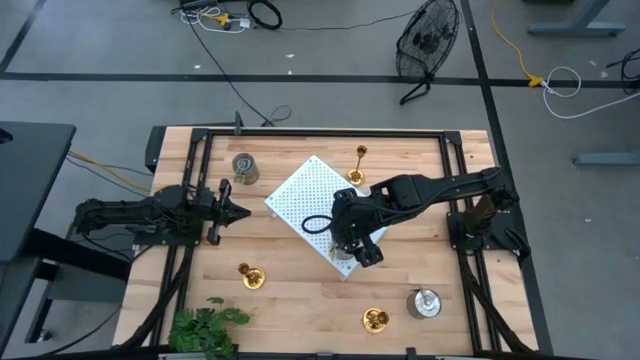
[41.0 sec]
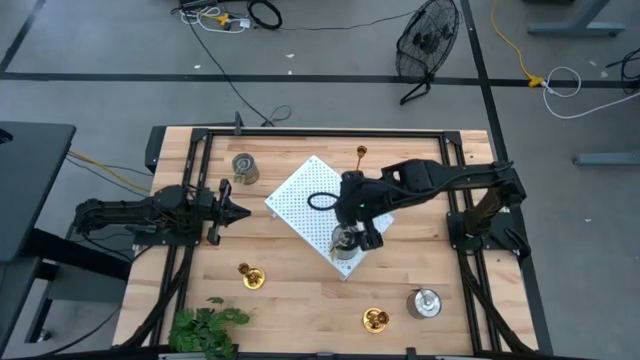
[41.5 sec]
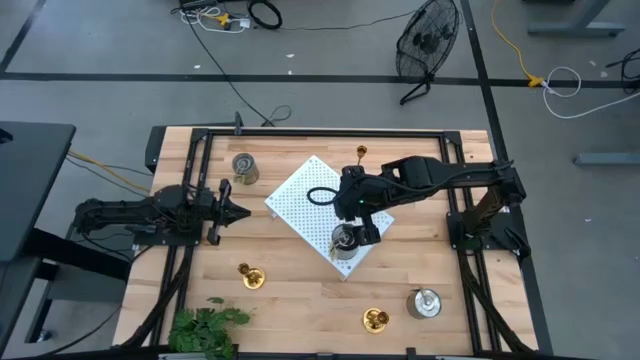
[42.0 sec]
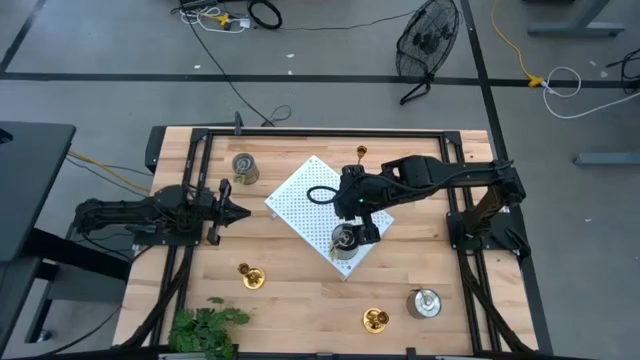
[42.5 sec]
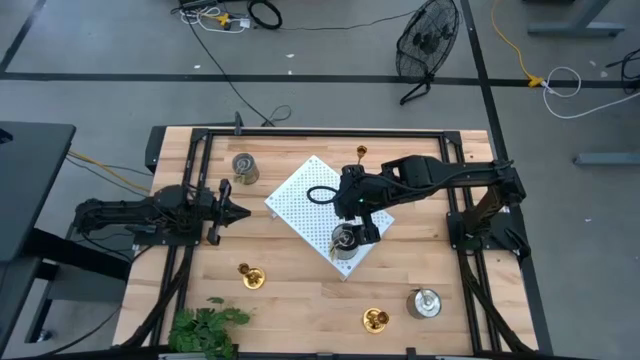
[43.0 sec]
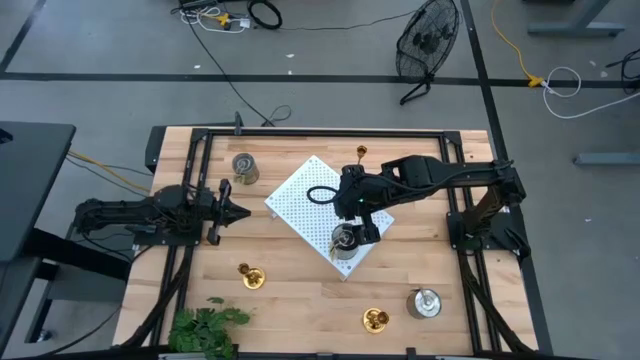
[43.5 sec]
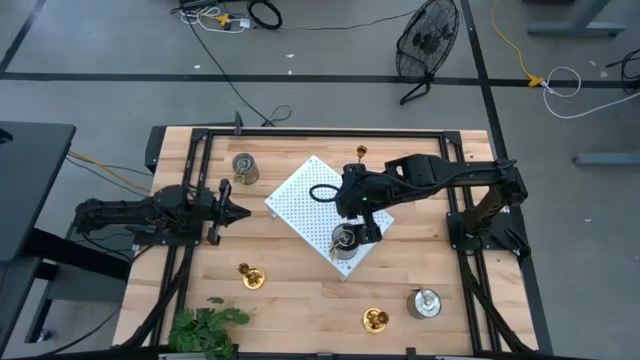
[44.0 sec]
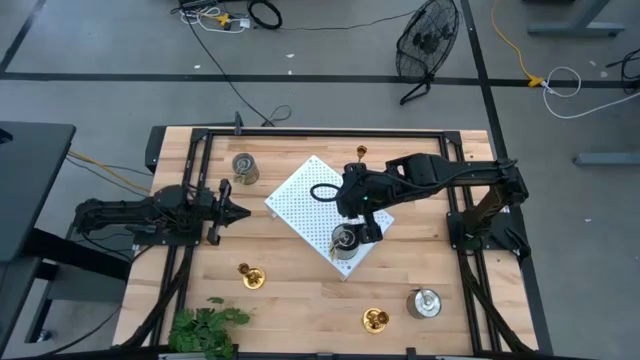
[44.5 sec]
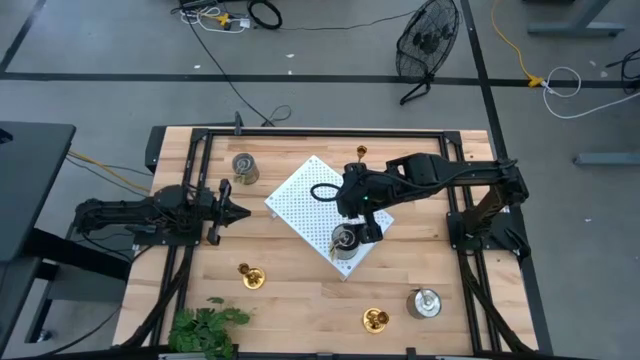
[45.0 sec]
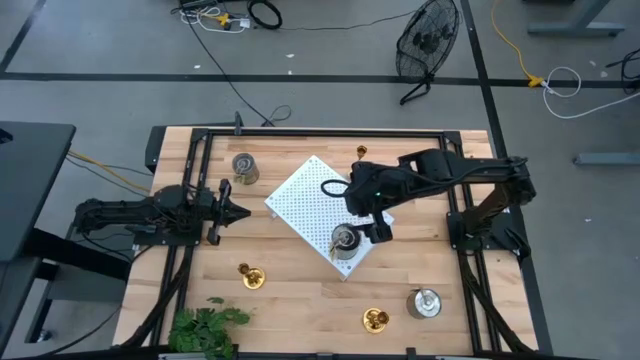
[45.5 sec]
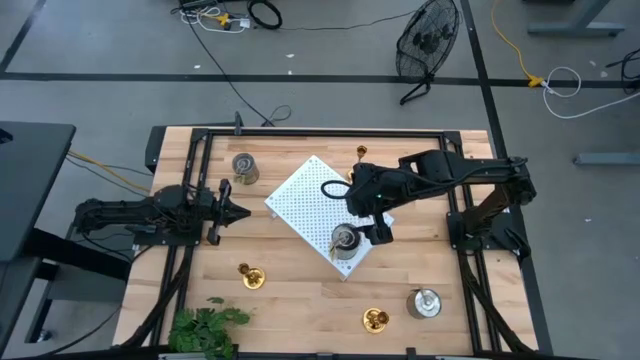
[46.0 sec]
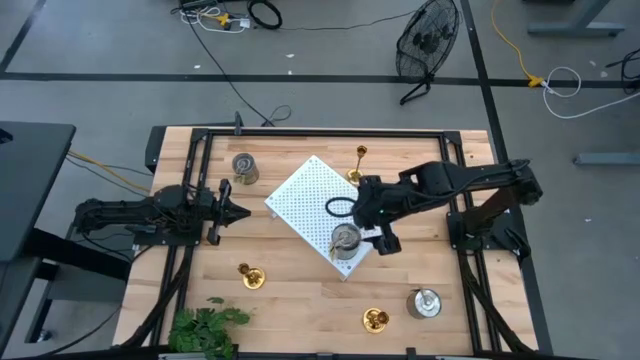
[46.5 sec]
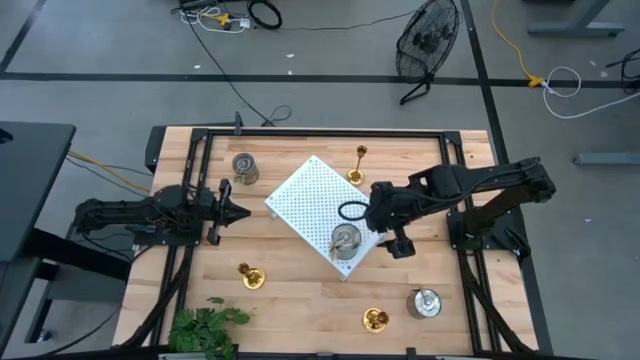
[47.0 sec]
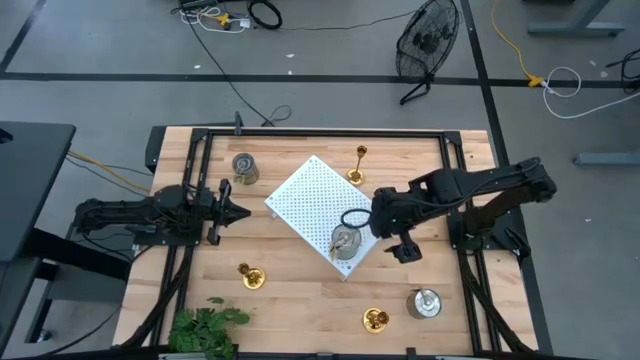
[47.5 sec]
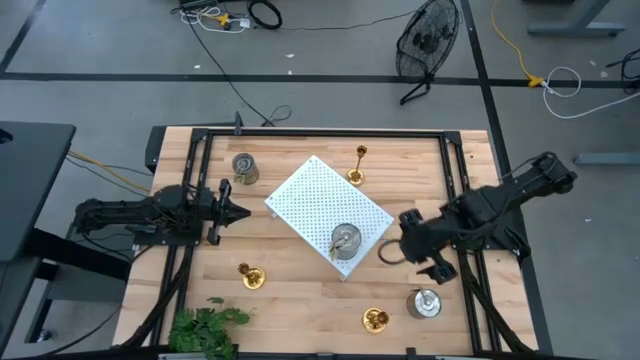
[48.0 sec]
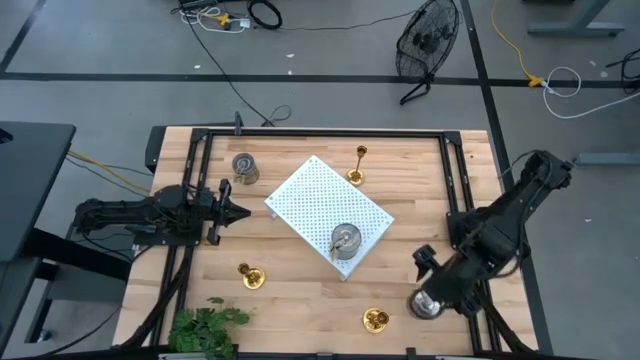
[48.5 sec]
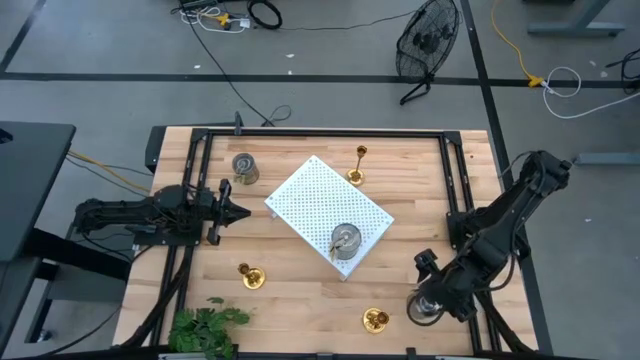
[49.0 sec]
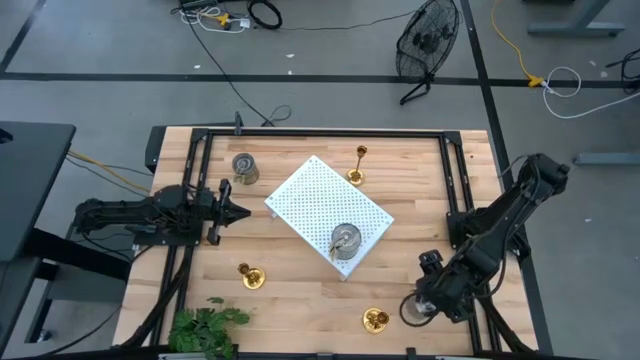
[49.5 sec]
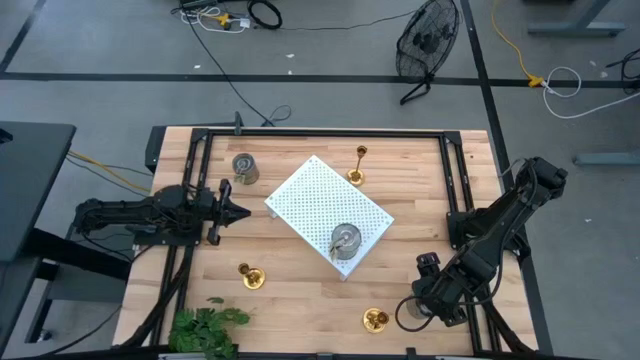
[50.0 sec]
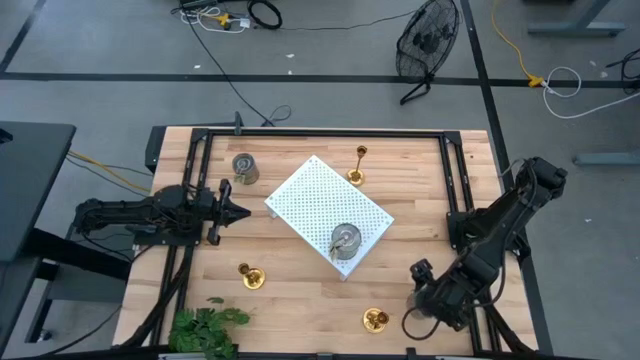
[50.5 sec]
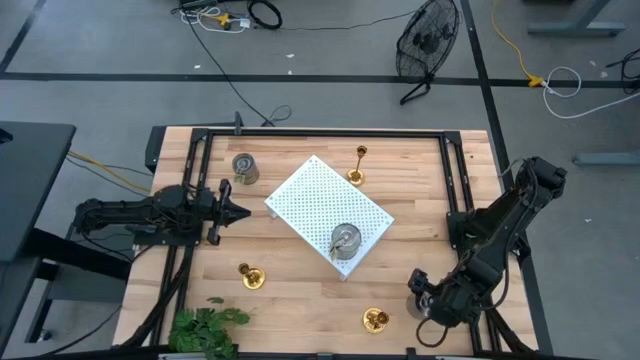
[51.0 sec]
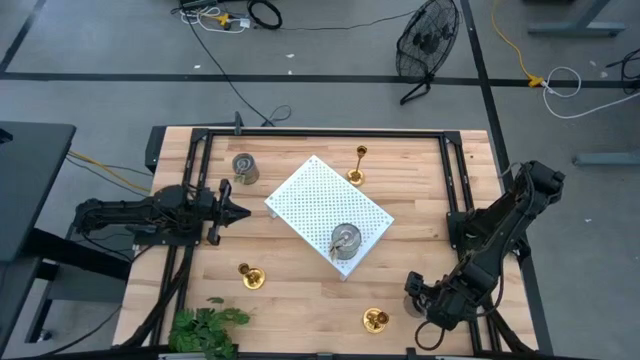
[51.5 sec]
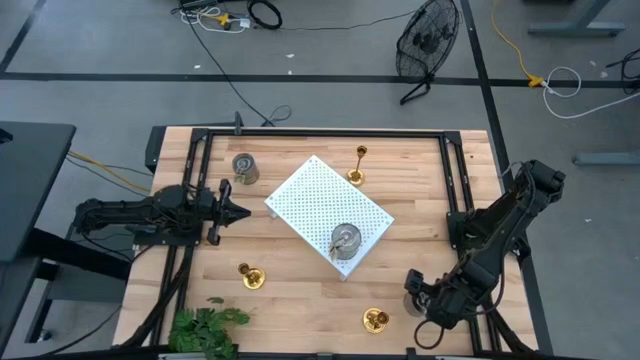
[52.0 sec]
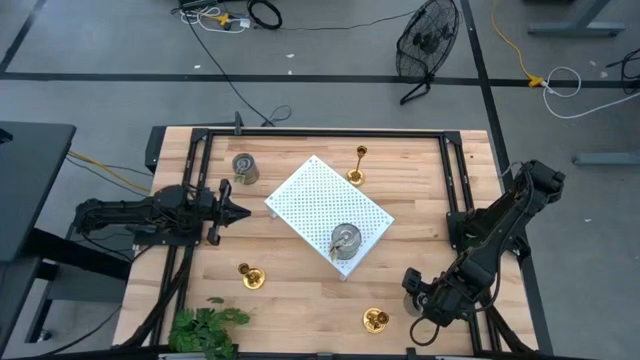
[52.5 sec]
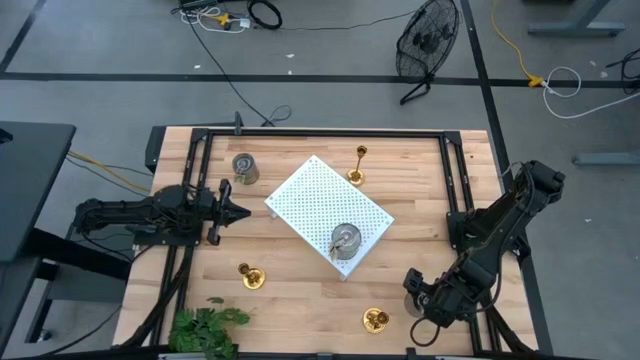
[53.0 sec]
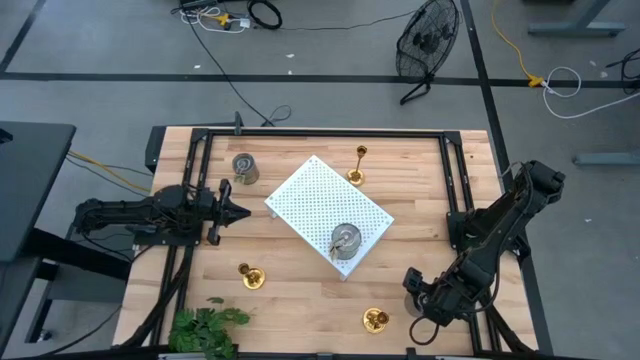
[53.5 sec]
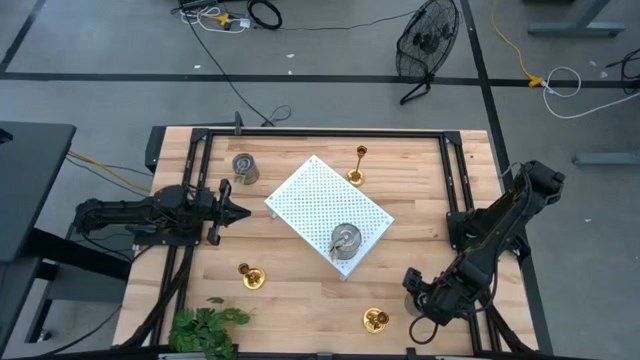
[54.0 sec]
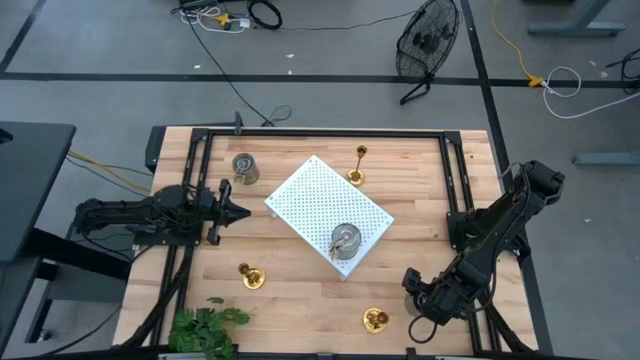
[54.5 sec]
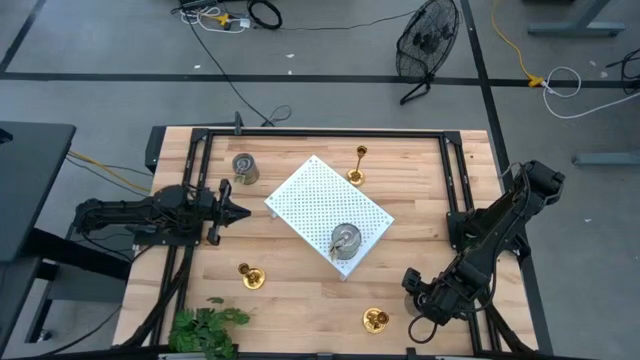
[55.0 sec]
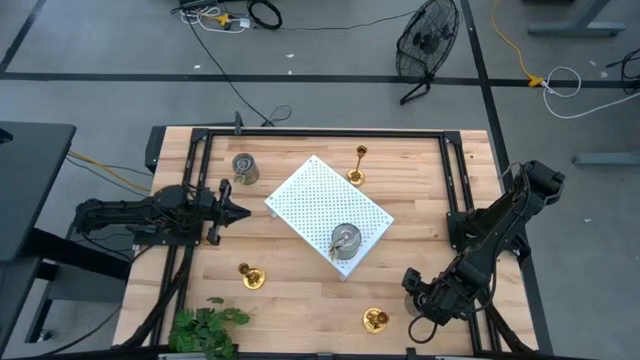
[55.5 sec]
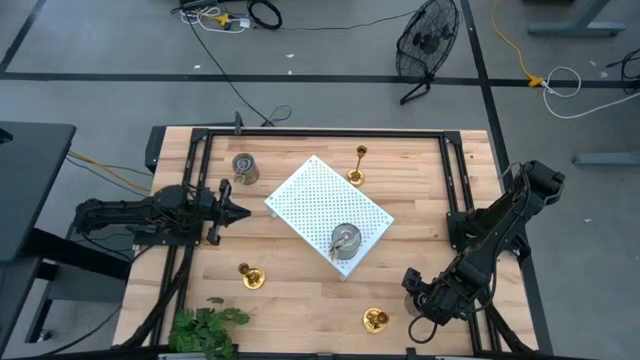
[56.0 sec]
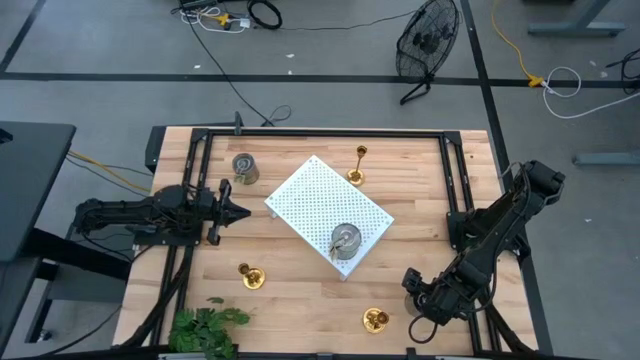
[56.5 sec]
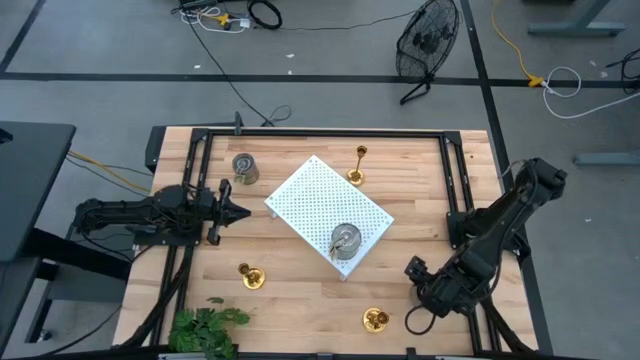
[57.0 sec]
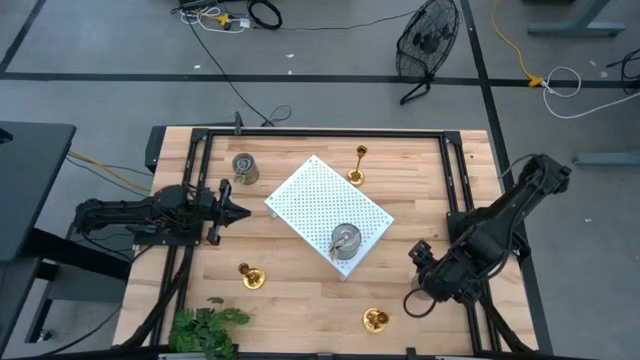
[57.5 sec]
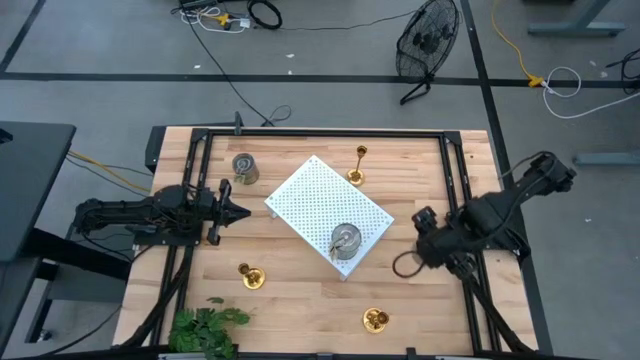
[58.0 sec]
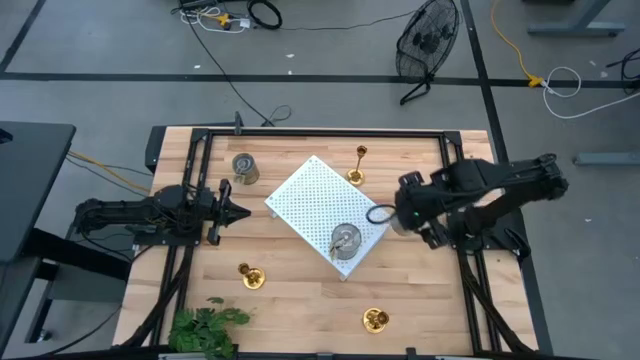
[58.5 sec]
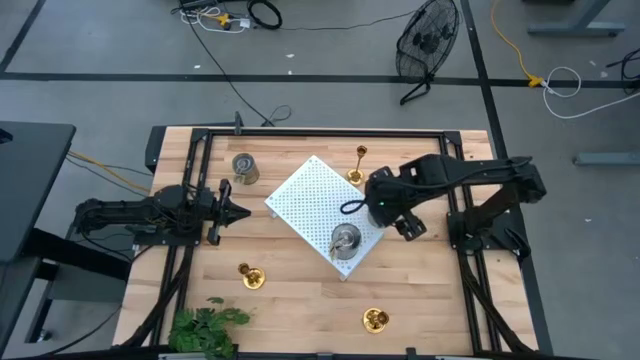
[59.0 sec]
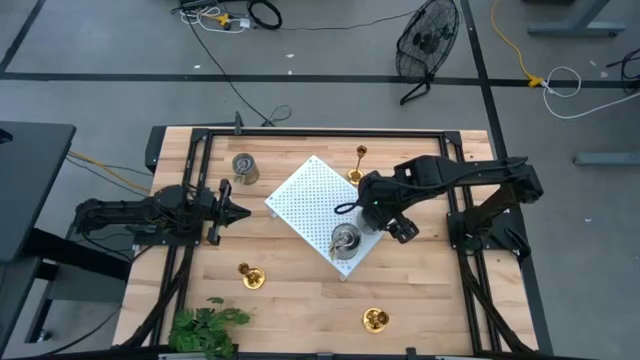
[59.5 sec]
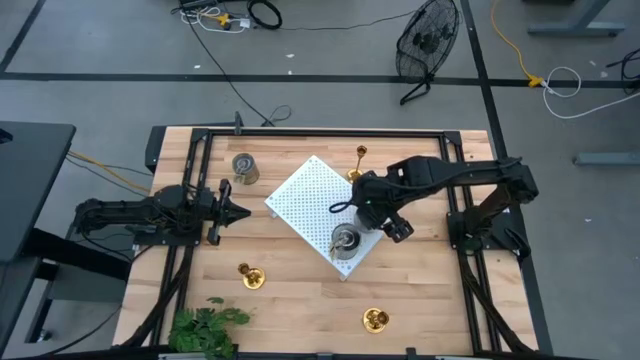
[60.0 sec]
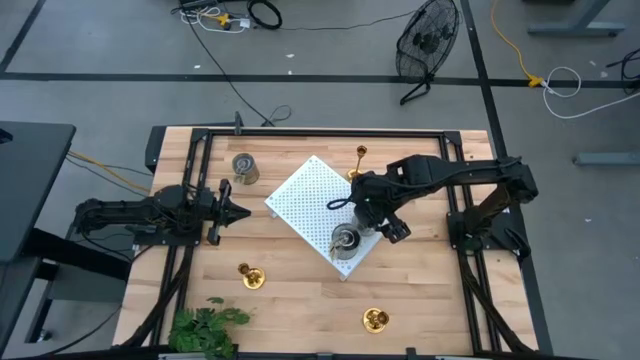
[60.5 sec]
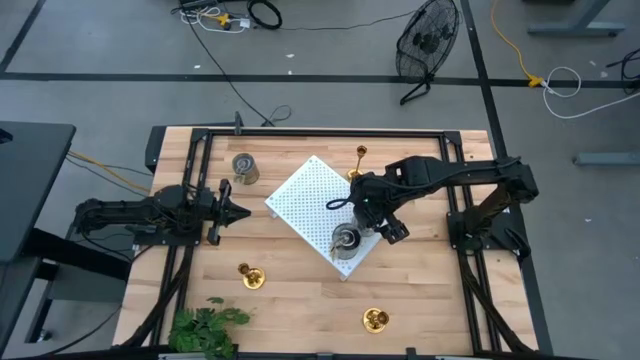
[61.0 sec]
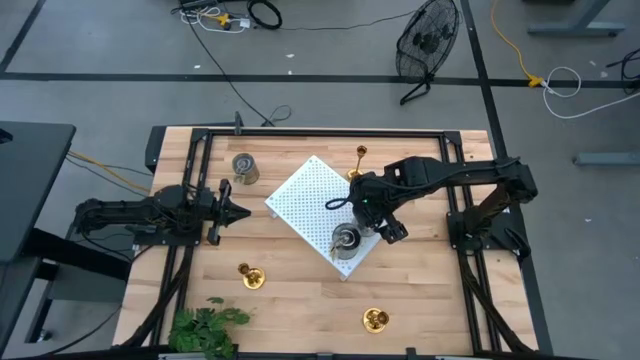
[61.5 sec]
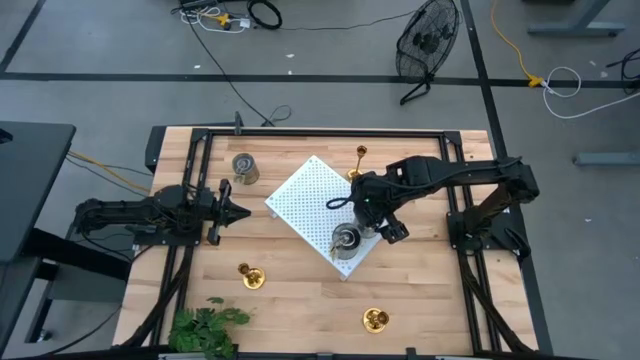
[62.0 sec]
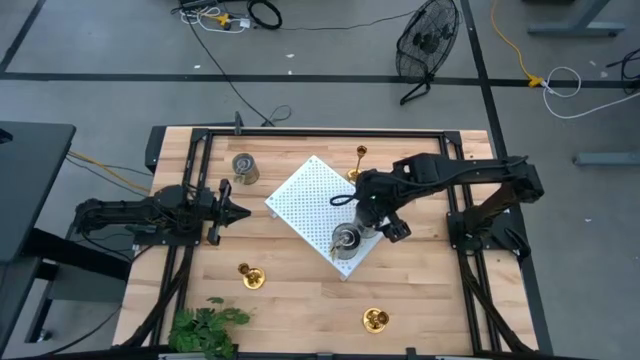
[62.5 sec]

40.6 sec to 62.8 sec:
Task: Pick & Place candle stick holders
Put the bottom right scented candle on the shelf align with the other scented candle
